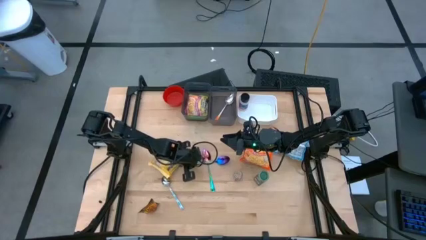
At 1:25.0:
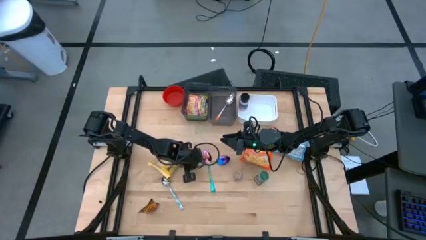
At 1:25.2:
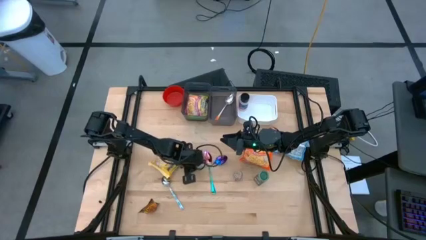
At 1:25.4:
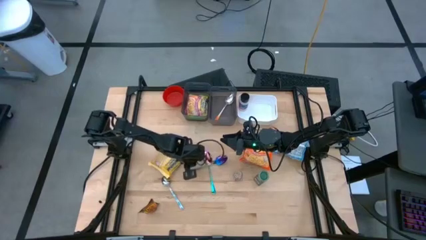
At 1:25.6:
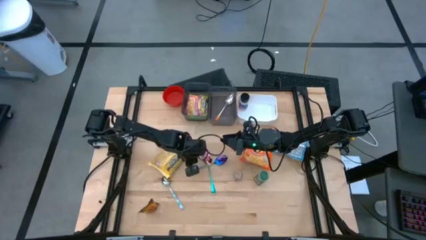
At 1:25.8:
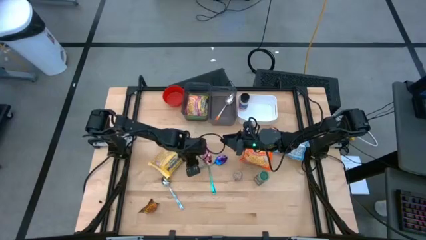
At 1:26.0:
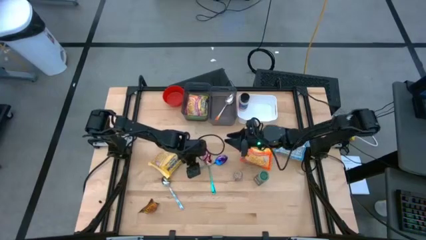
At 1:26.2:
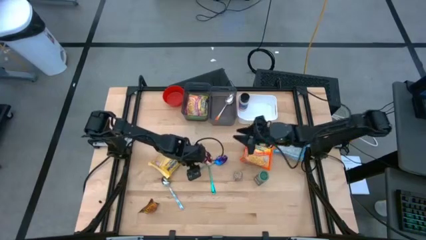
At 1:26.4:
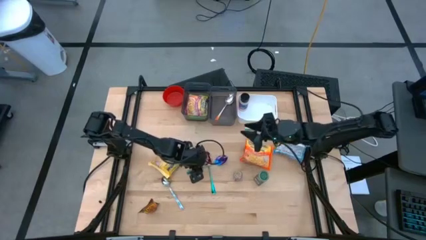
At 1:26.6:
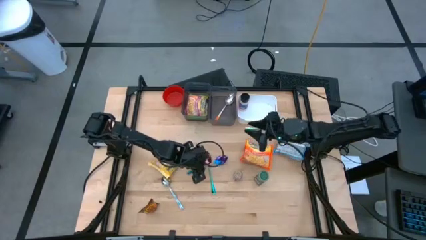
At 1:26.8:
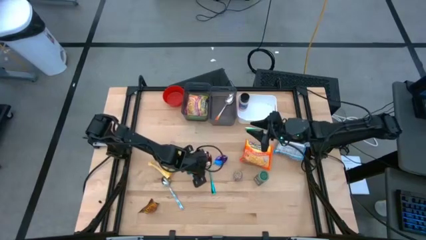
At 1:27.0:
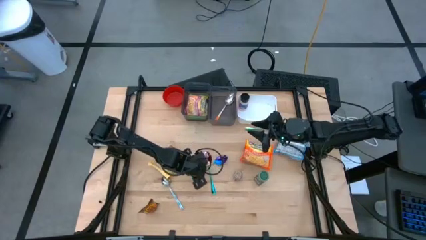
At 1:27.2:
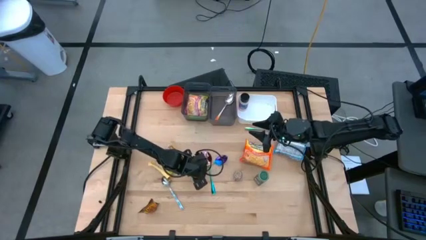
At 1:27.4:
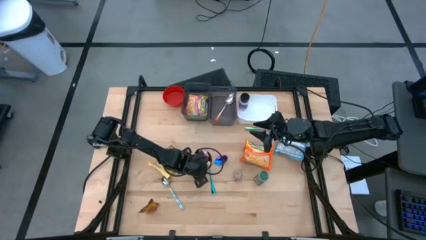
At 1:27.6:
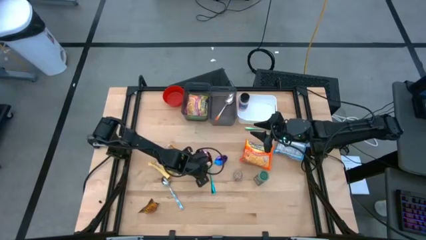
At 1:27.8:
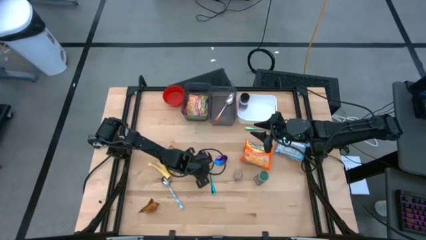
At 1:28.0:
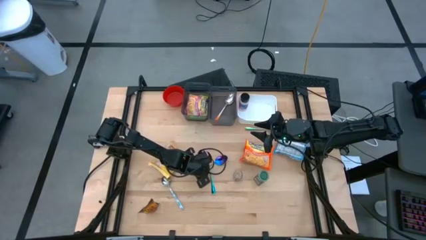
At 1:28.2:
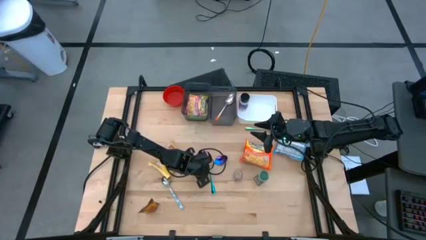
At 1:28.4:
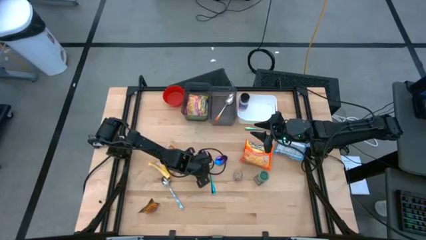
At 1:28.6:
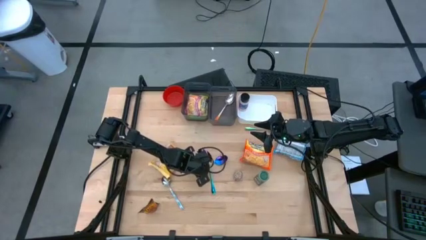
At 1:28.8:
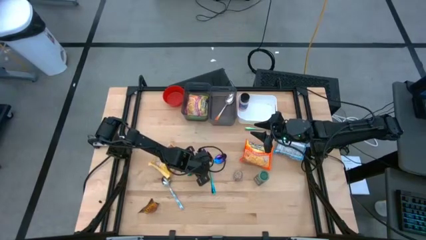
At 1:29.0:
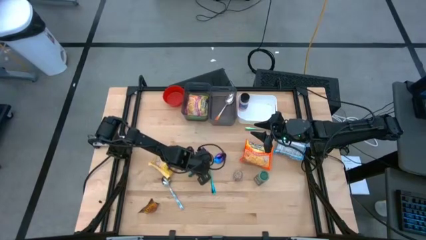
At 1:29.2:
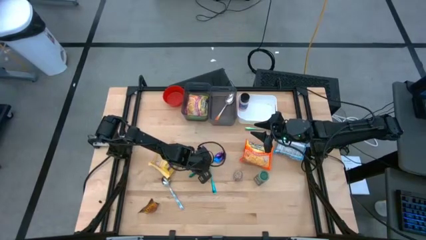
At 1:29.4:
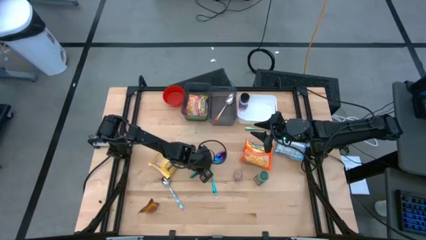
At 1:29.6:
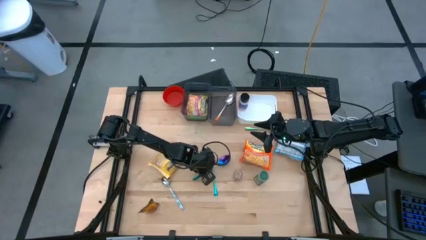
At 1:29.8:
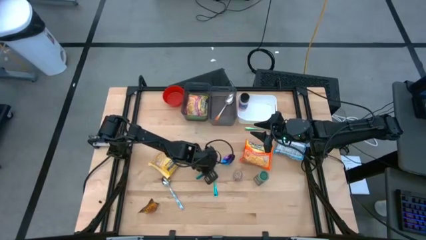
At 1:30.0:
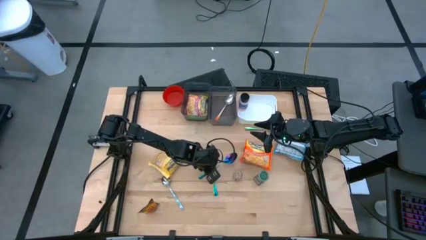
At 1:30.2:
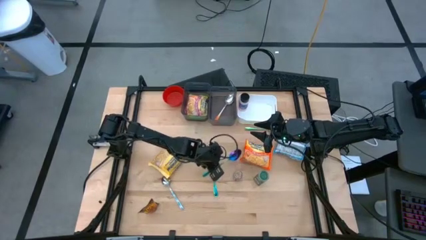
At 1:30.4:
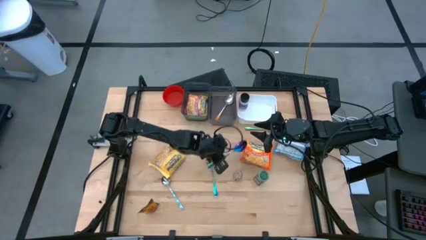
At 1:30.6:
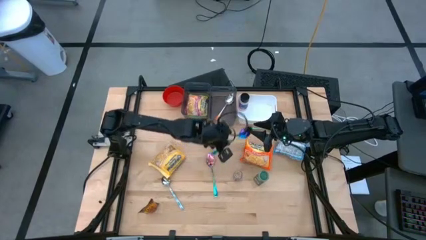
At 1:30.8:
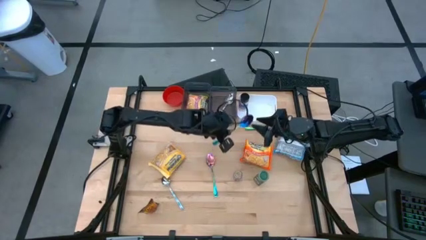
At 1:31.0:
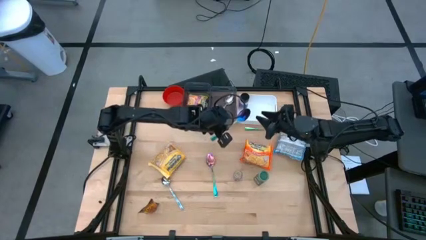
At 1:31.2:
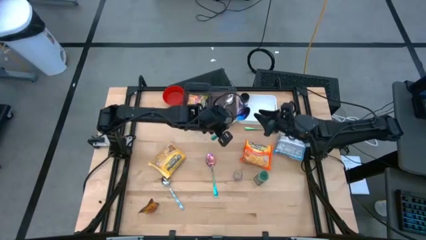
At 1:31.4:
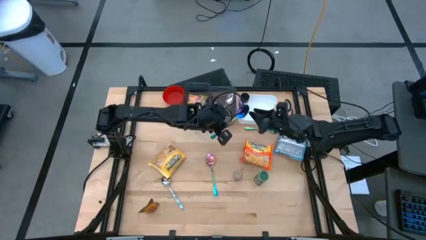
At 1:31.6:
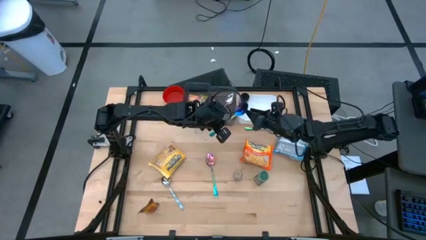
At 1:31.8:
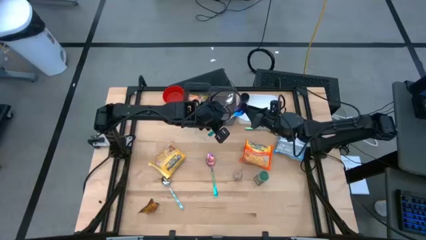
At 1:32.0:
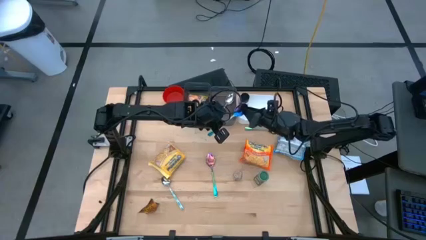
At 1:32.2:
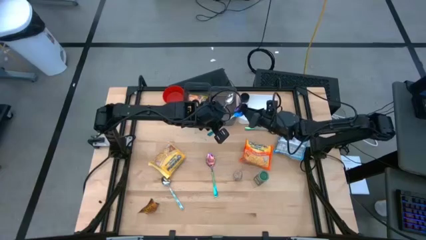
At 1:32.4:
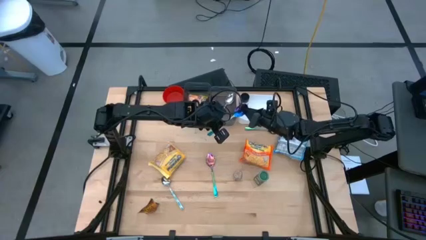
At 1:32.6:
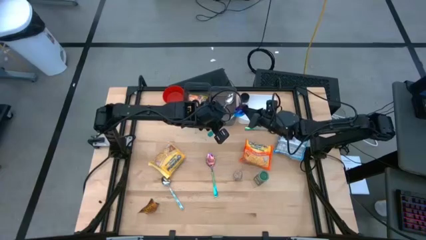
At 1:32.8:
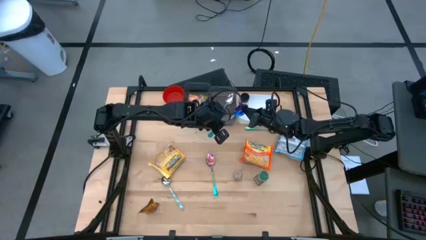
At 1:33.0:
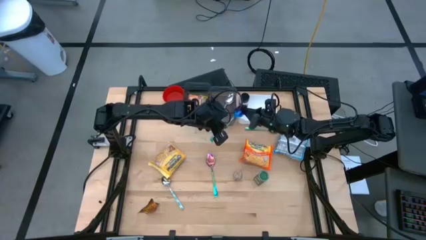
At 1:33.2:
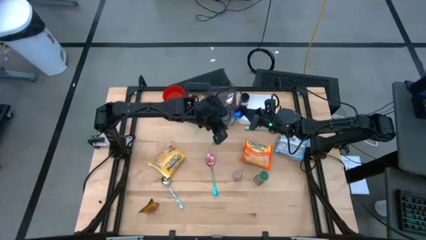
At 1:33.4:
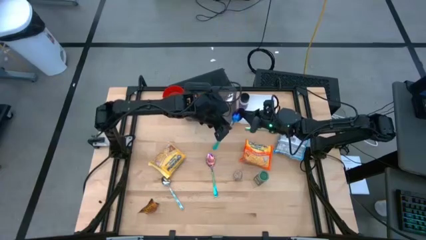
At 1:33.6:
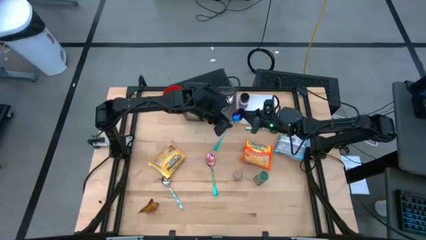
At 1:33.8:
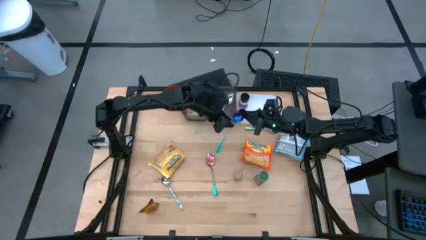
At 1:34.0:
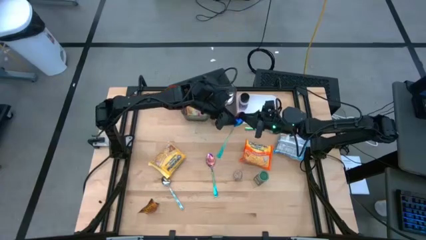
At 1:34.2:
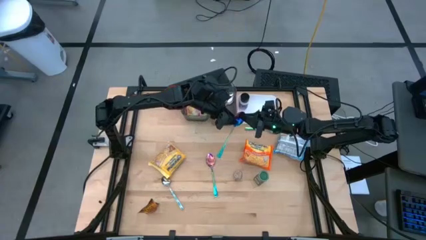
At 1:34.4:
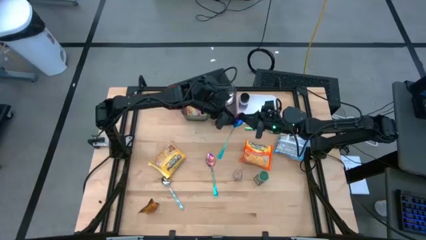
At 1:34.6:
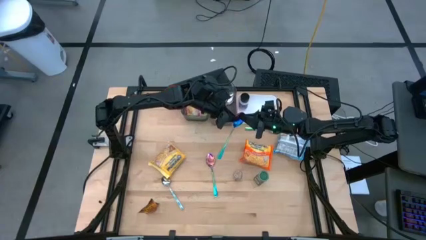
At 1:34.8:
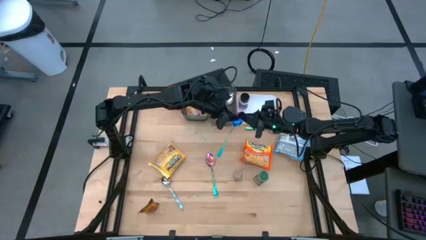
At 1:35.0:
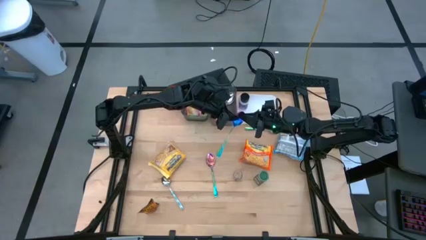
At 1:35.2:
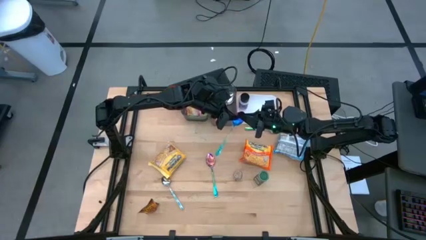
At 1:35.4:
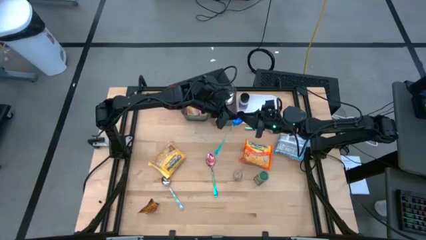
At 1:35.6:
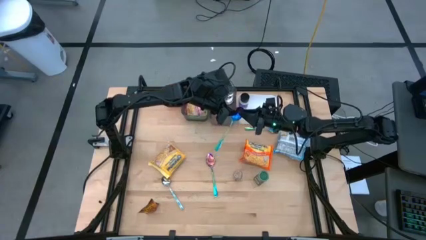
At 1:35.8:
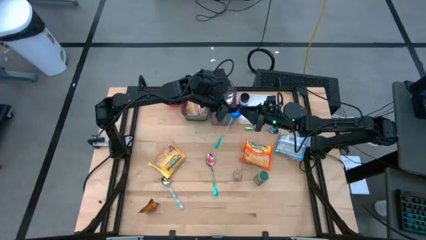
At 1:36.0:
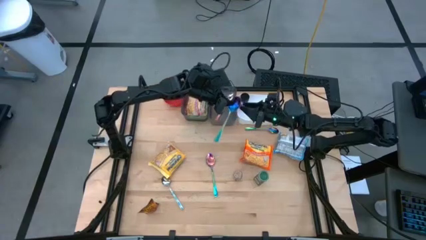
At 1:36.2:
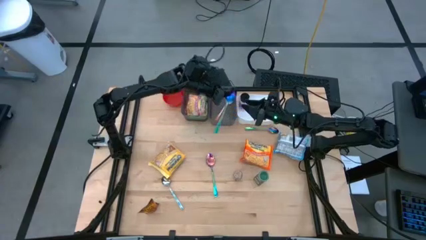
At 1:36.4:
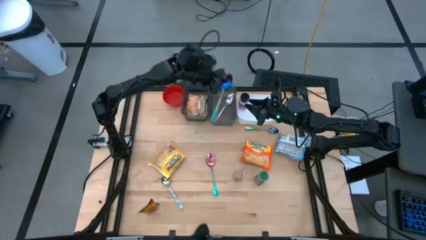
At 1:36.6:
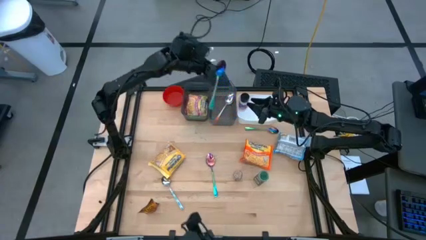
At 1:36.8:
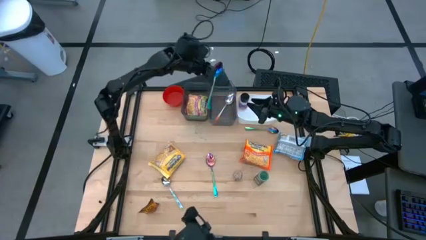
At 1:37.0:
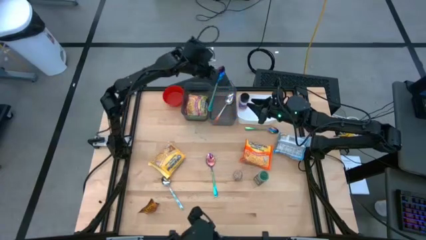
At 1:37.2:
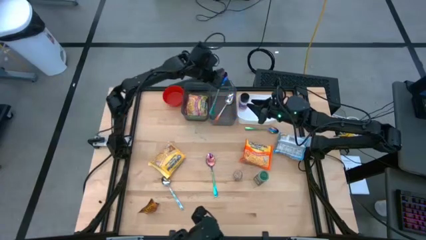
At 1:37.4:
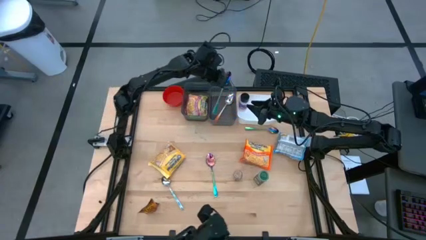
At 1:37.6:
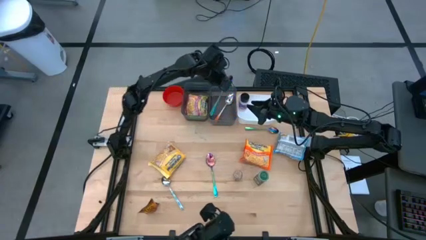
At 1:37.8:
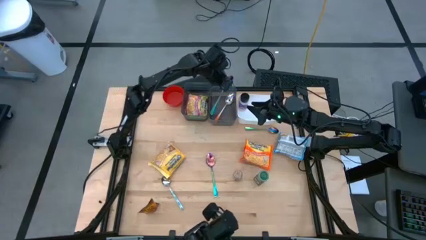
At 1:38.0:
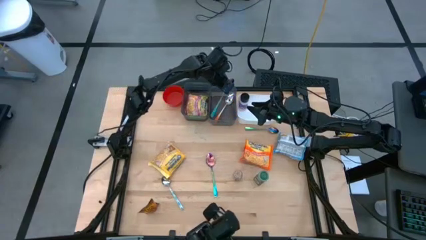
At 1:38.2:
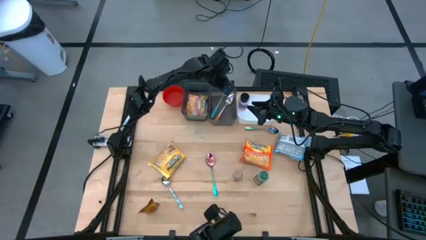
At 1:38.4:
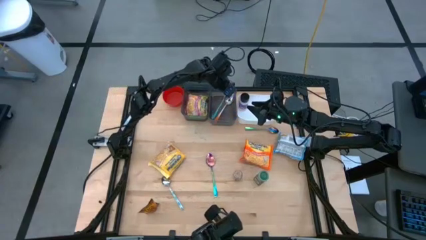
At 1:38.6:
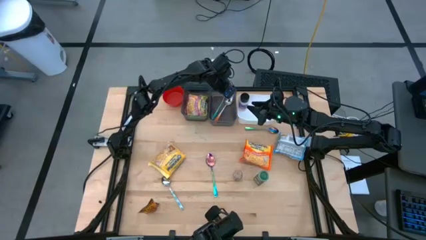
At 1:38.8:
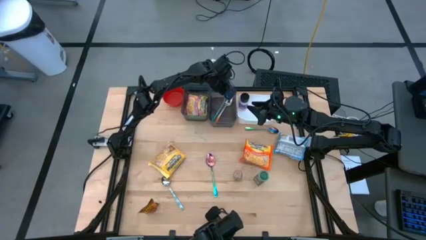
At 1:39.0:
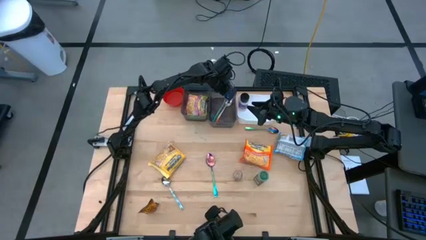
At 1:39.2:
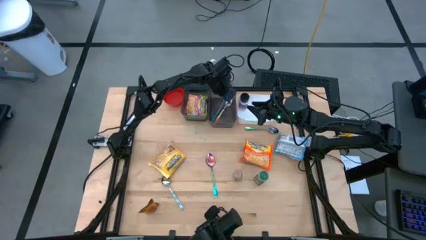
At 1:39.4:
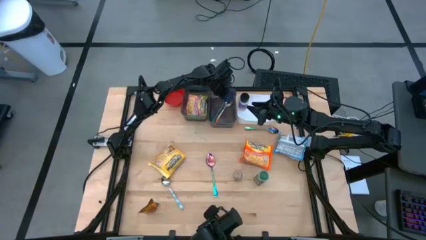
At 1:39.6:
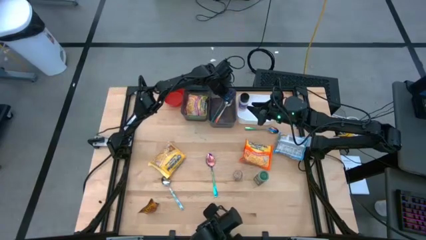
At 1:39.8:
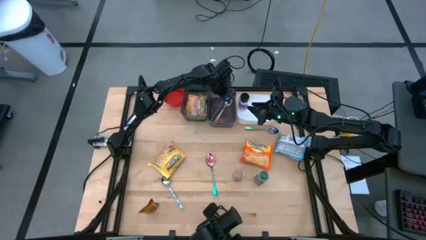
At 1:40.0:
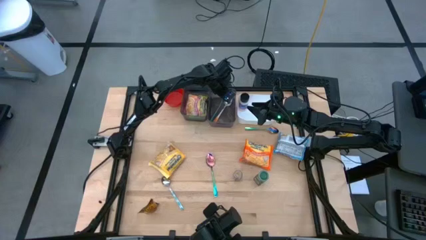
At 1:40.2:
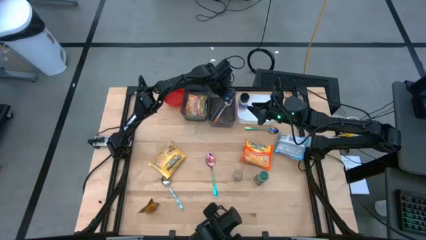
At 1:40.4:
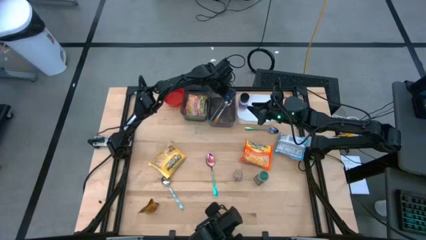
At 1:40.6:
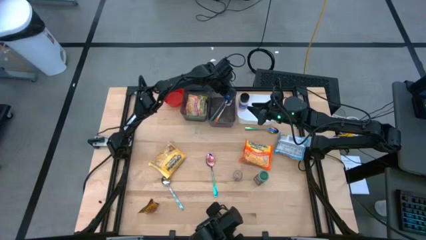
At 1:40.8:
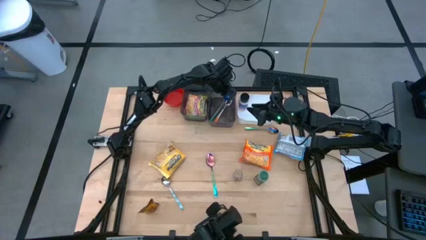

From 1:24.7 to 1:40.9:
Task: Pick & Place Food Item
Put the bottom left violet spoon into the right black bin

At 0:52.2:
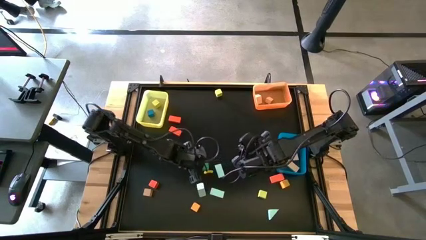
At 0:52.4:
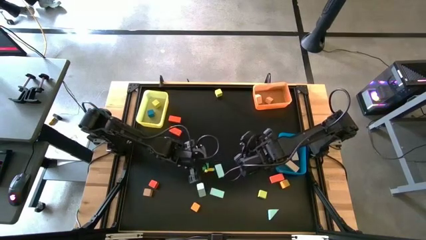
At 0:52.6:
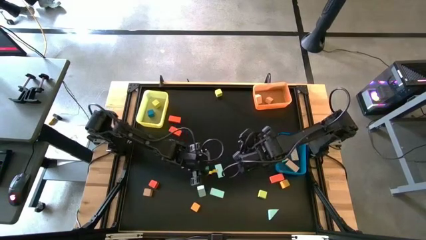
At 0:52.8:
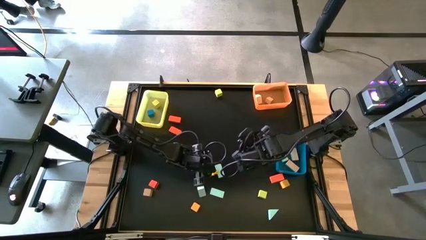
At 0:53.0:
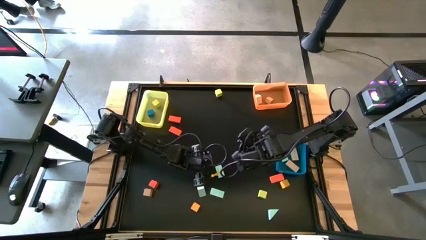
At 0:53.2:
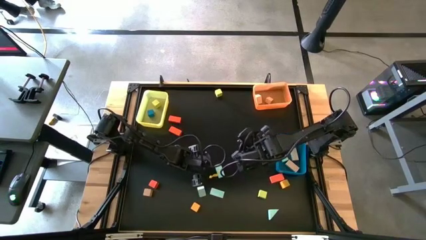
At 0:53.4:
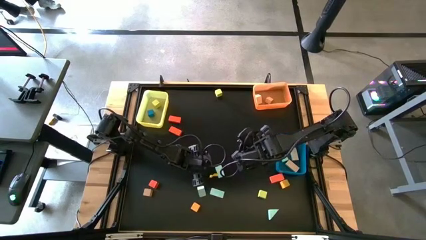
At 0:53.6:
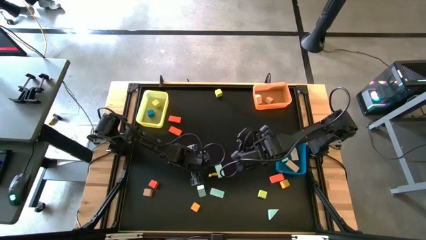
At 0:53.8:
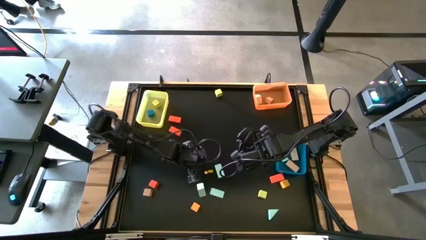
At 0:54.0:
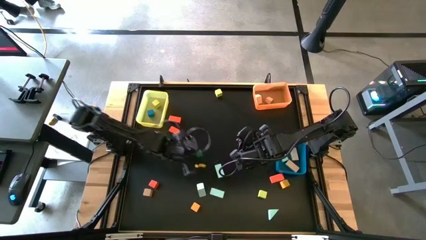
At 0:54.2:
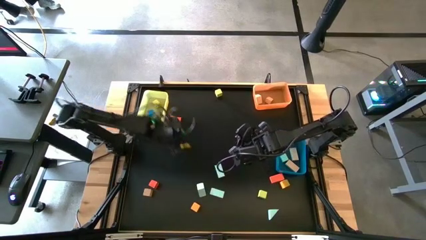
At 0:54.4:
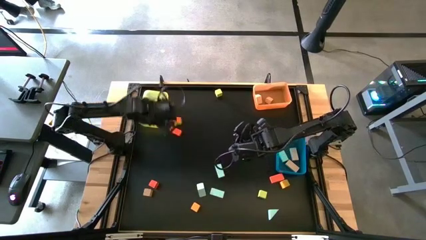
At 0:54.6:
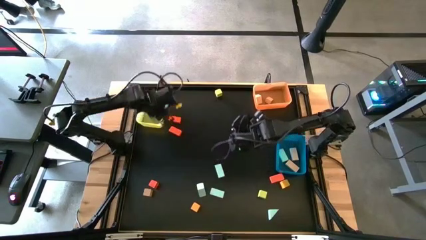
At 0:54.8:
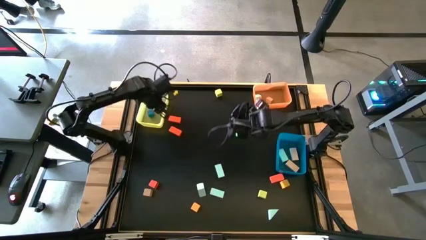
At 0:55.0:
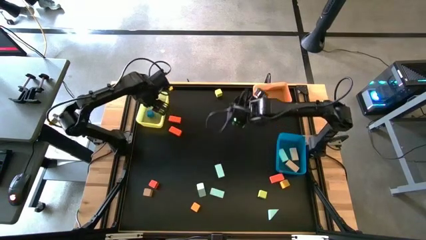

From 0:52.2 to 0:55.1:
Task: Sort blocks by size
Put the green square block into the yellow bin
